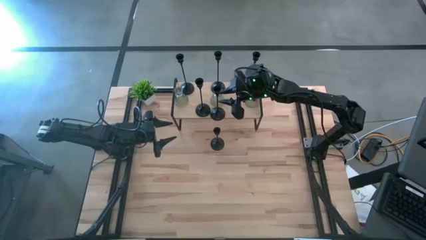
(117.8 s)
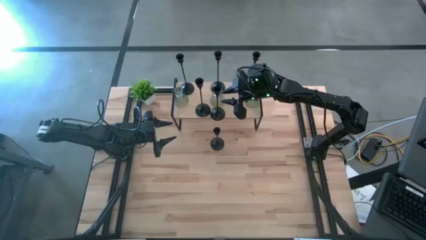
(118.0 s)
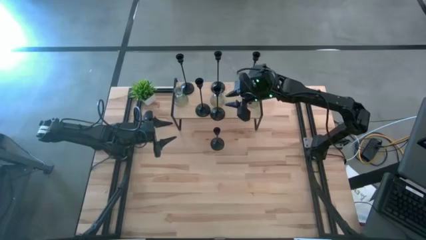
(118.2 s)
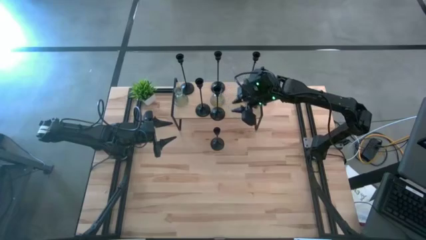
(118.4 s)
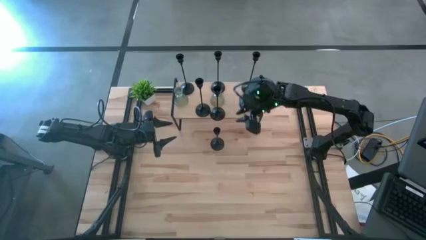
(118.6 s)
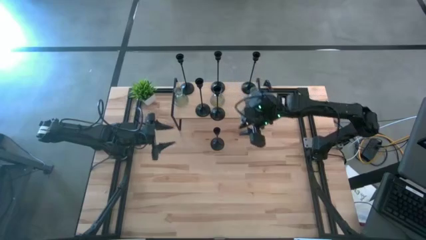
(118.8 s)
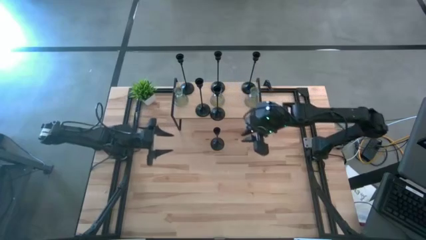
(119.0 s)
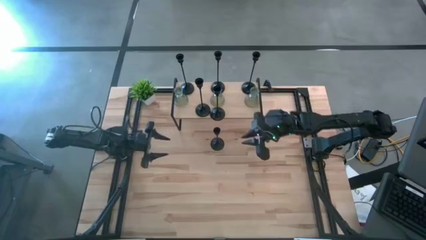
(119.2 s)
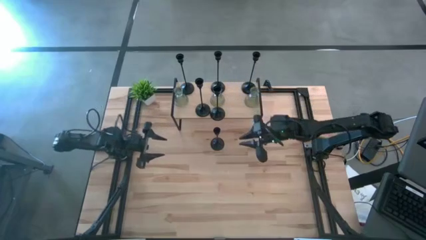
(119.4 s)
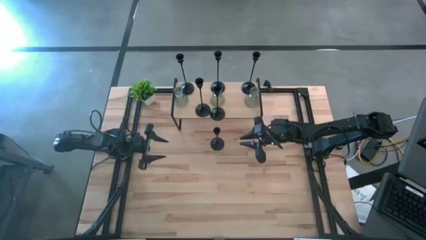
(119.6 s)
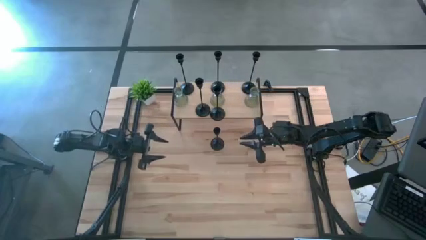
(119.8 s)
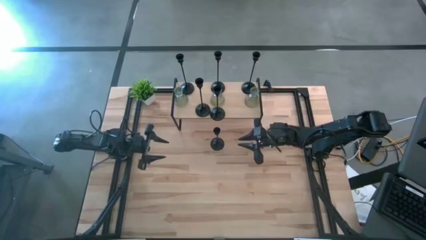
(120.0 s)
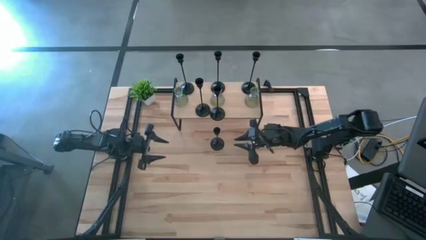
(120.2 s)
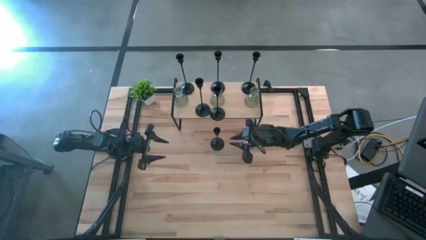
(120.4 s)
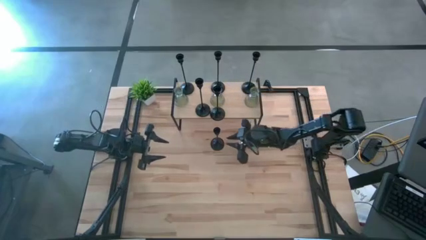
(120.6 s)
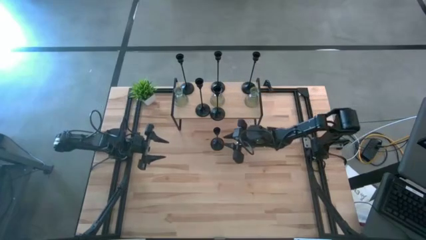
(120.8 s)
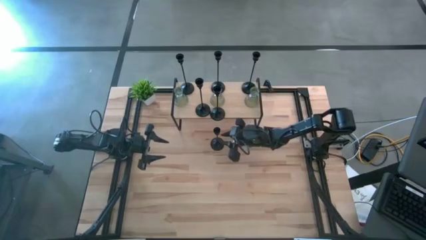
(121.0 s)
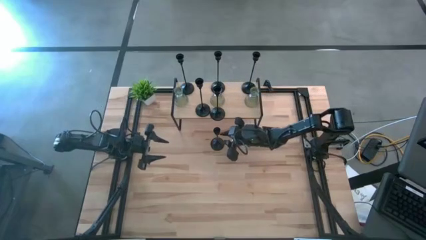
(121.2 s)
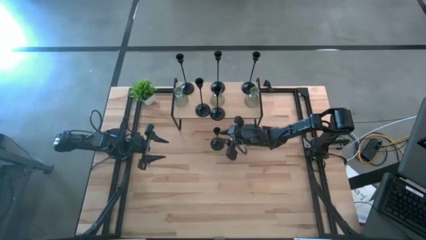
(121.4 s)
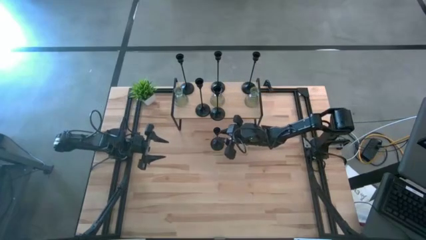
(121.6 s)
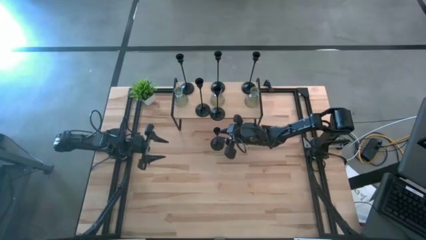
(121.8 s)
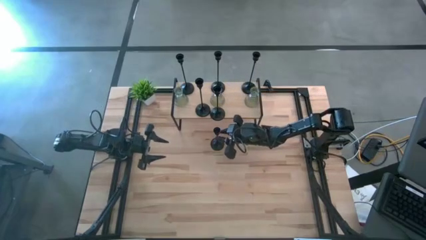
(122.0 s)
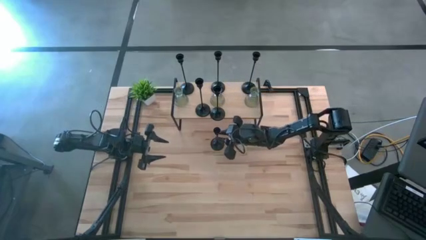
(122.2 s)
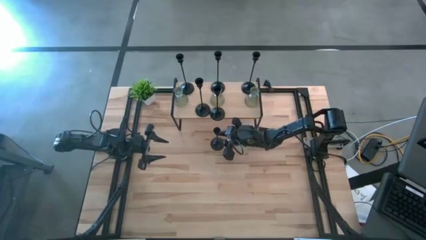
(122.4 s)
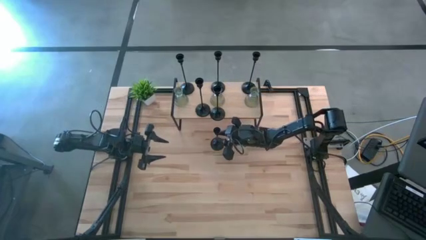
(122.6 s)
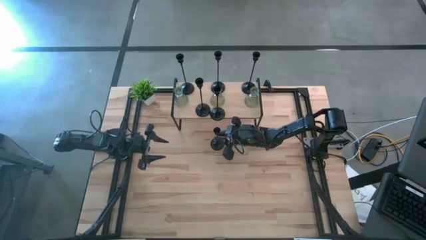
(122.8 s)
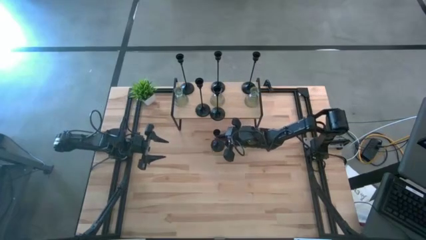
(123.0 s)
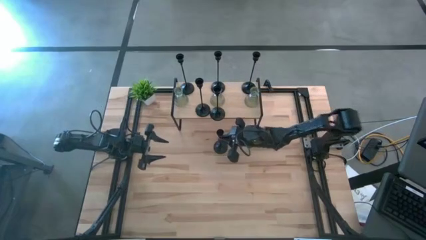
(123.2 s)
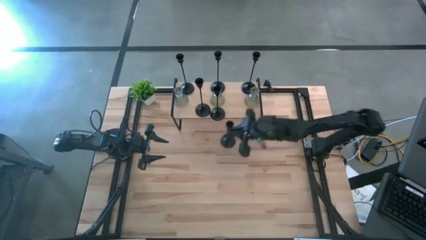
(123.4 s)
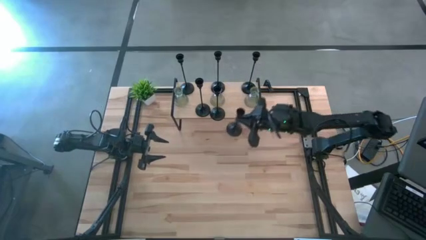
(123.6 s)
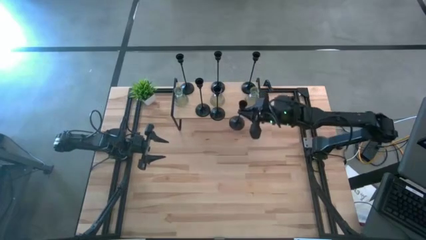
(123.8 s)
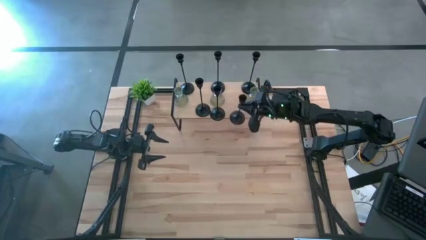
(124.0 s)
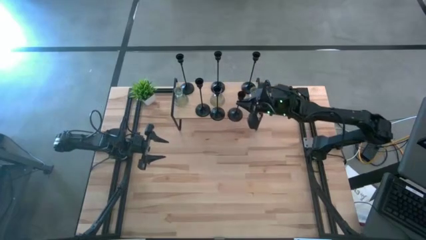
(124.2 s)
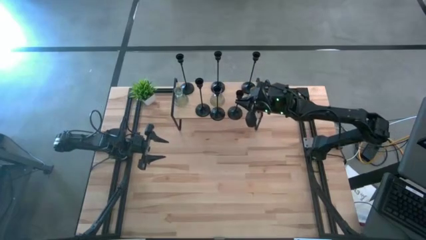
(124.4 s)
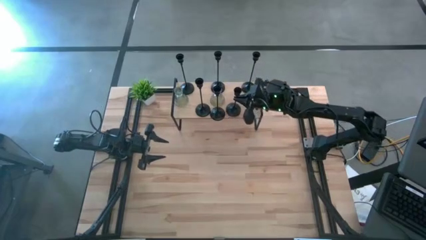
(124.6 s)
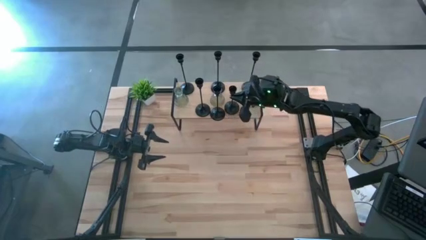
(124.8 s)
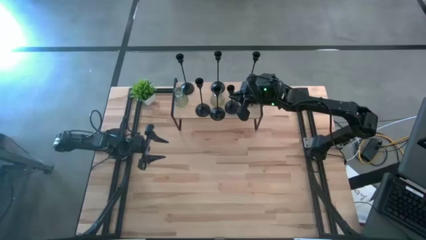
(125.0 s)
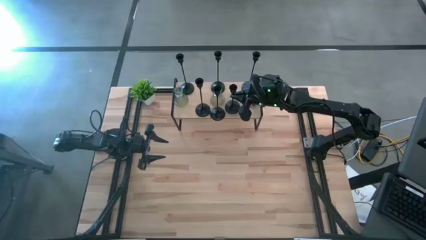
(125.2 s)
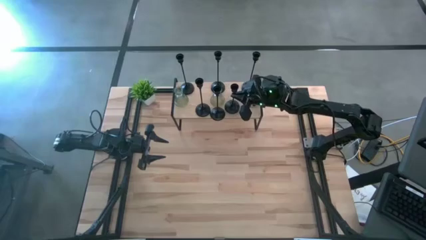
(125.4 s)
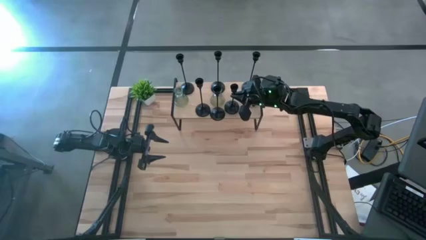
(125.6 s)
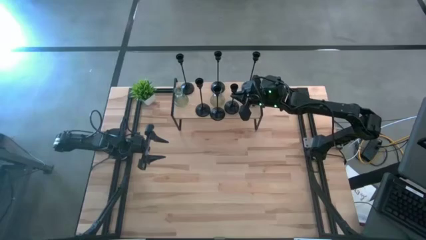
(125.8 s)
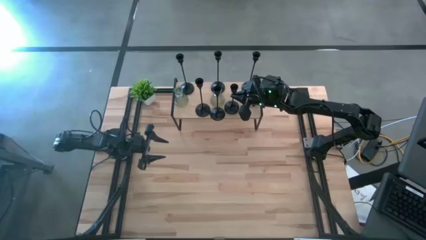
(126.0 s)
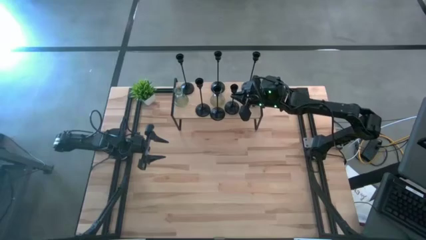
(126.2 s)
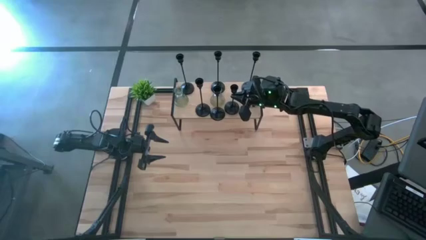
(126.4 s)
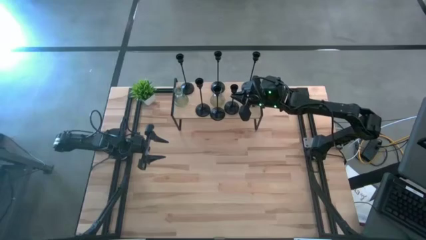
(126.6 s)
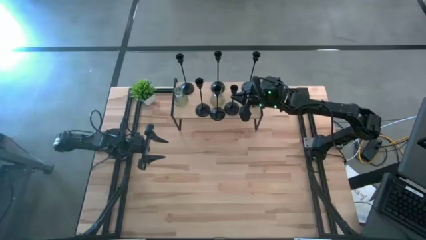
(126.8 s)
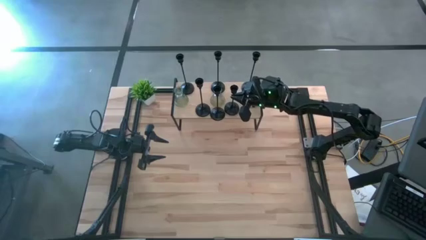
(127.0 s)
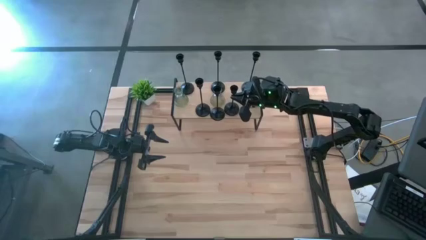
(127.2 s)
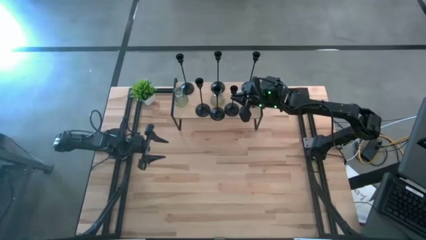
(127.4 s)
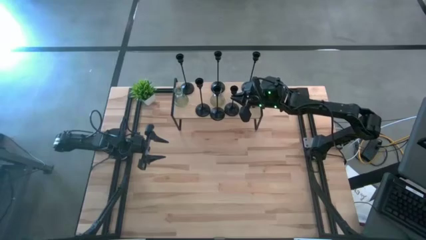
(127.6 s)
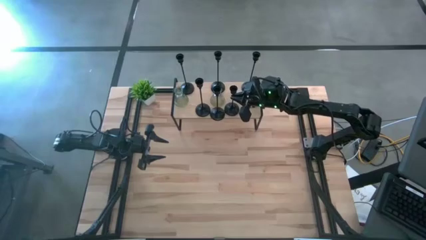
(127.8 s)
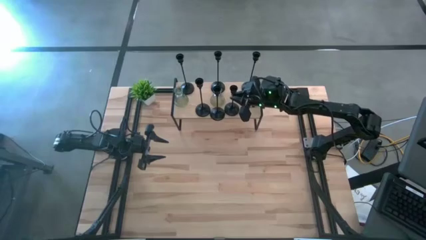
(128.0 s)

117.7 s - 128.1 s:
Task: Pick & Place candle stick holders
Put the black candle holder on the shelf

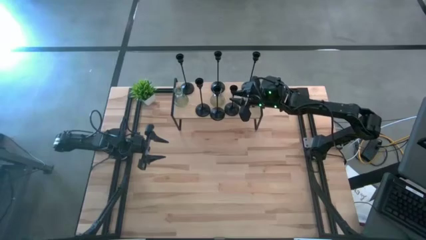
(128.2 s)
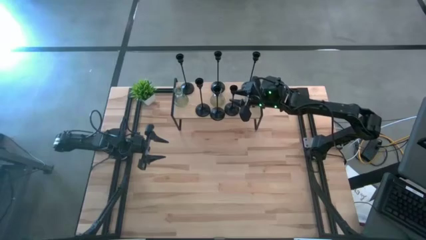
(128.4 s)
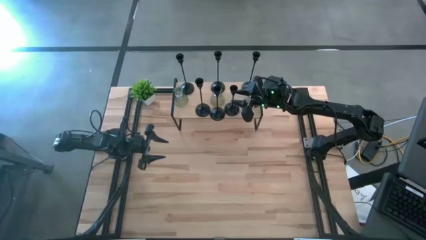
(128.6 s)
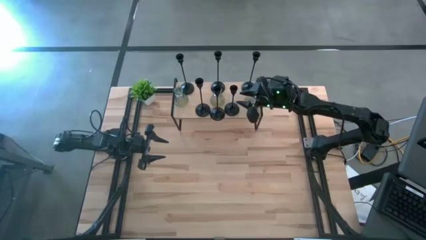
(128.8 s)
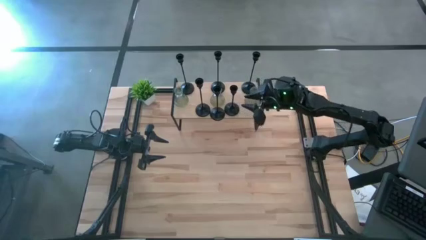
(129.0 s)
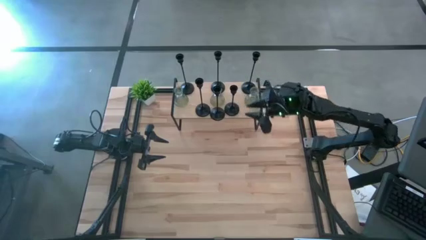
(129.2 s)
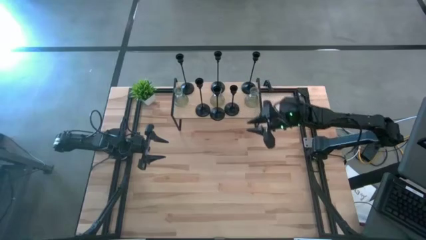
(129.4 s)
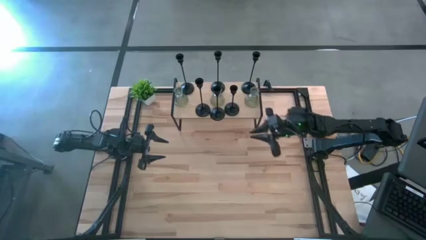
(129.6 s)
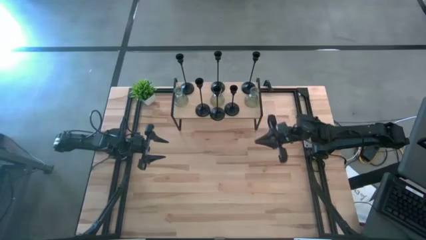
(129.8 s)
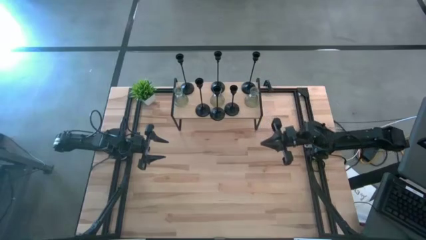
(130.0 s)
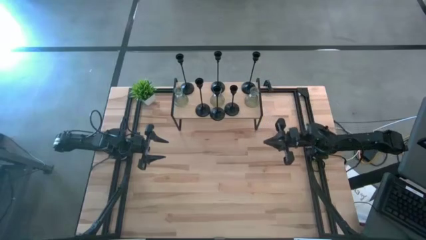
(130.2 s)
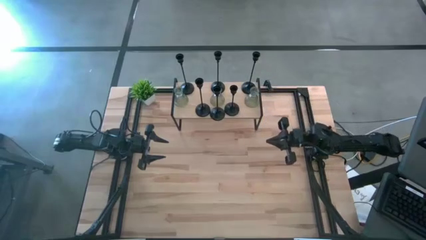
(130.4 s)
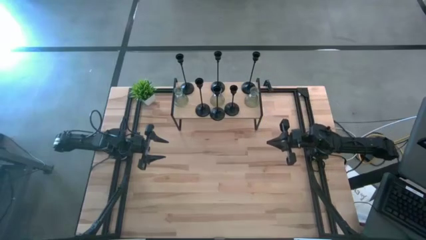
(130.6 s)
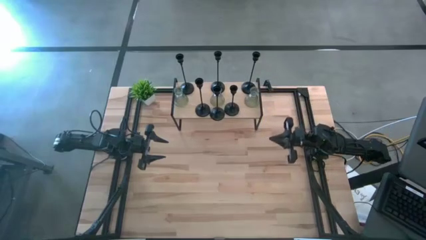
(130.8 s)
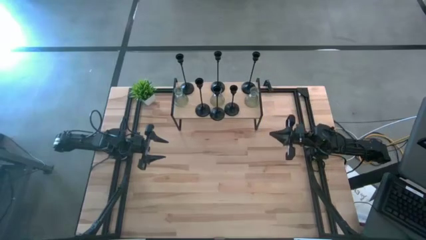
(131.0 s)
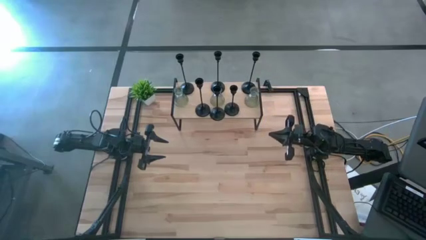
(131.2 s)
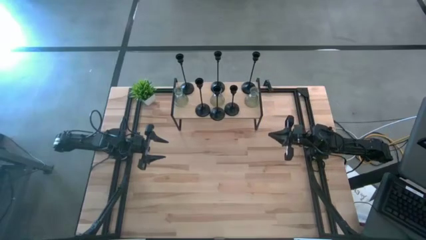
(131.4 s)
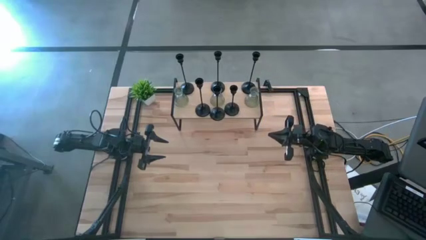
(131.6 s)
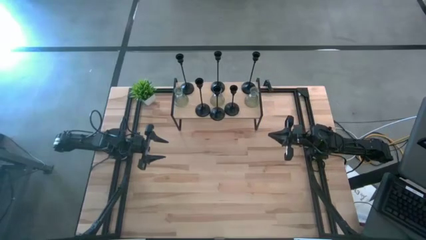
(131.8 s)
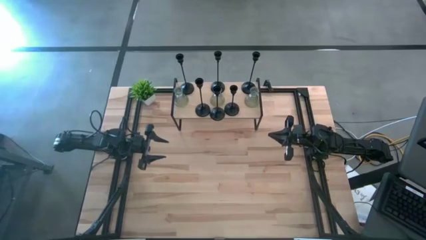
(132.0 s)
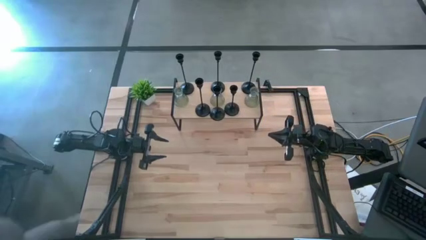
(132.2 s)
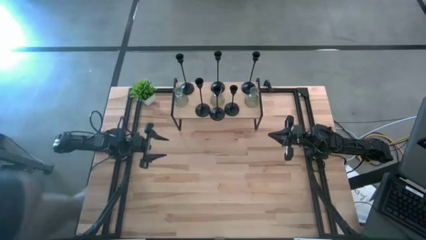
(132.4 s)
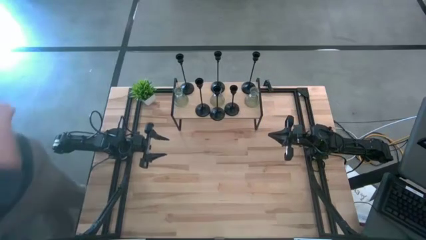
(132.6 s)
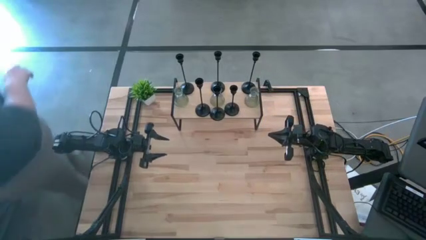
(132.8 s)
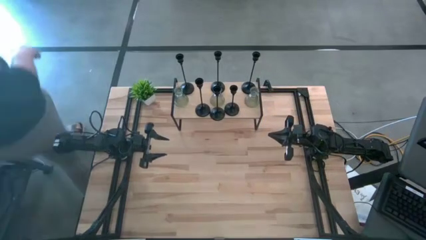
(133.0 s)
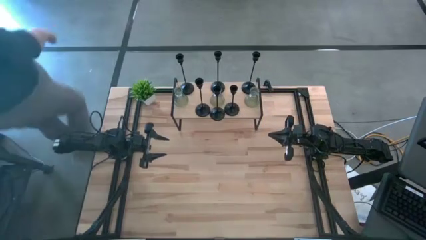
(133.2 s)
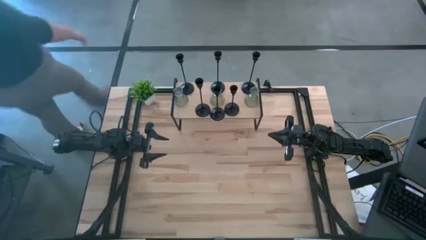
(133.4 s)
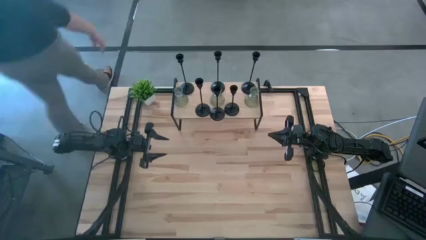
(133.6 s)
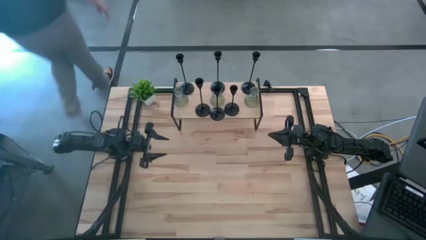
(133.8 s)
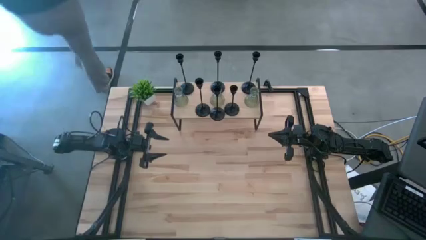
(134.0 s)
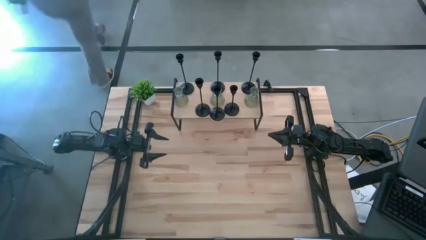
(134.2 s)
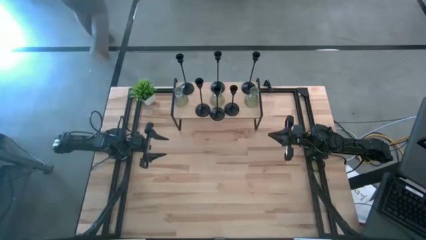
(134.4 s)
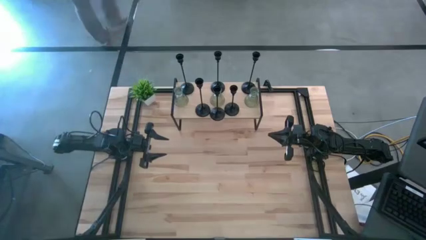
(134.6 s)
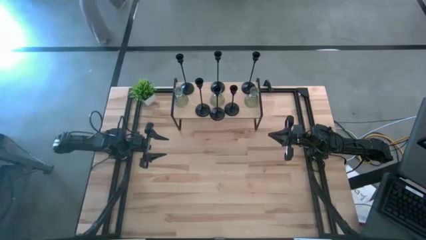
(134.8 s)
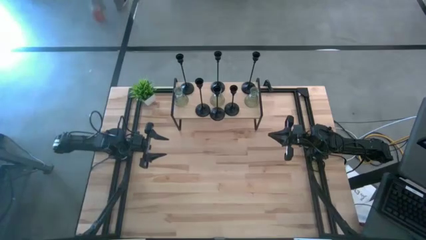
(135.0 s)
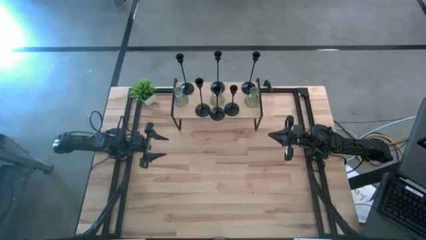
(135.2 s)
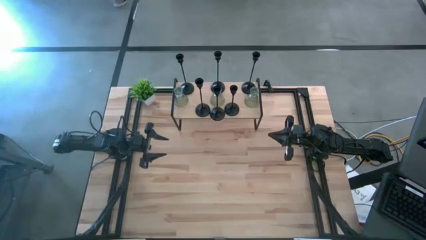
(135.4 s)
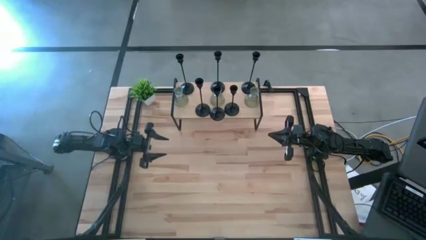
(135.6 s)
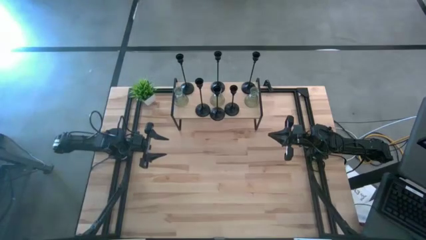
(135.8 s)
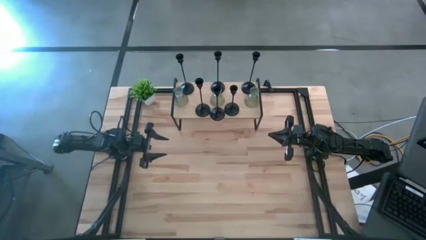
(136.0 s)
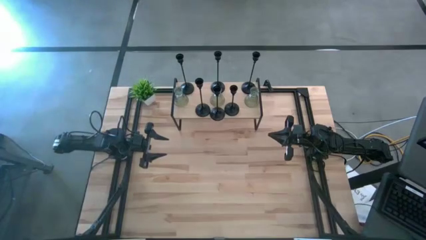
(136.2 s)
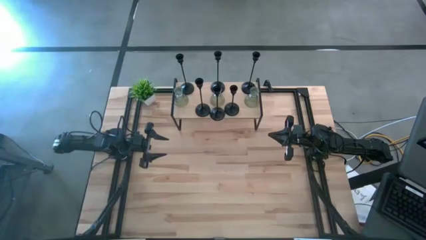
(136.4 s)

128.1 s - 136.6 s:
Return to home position
